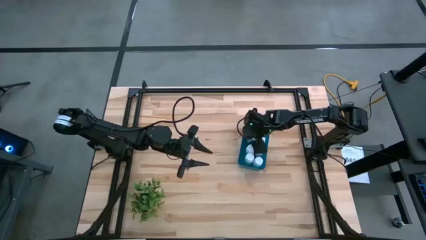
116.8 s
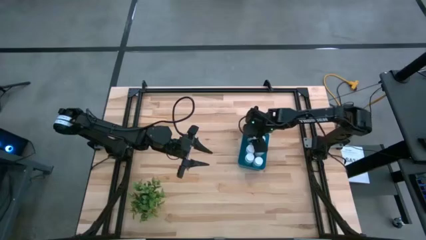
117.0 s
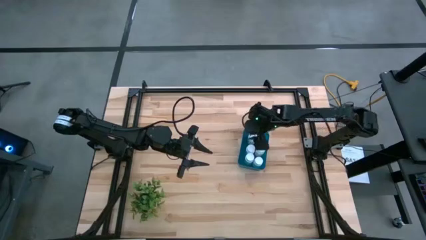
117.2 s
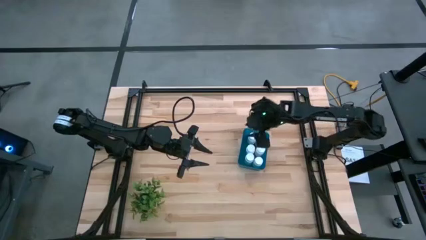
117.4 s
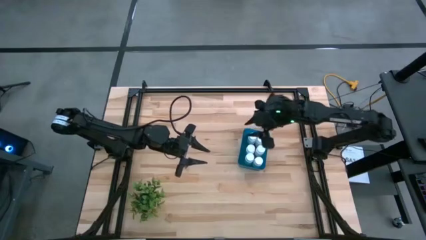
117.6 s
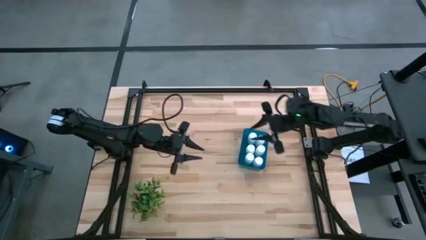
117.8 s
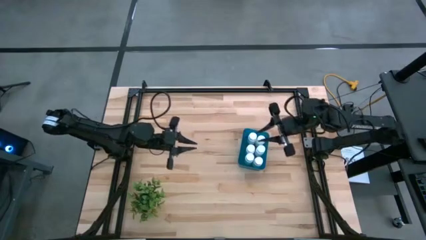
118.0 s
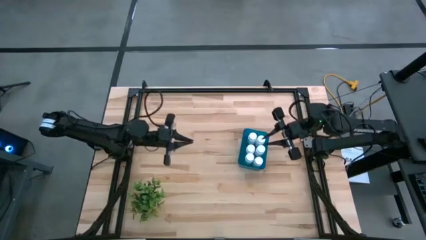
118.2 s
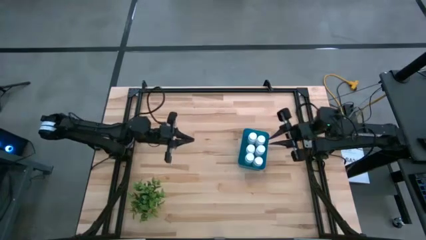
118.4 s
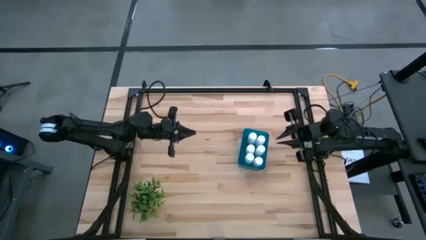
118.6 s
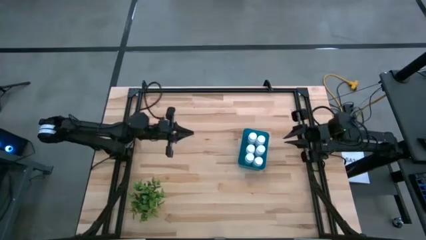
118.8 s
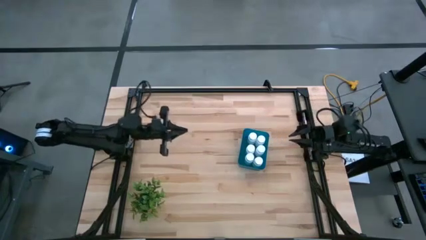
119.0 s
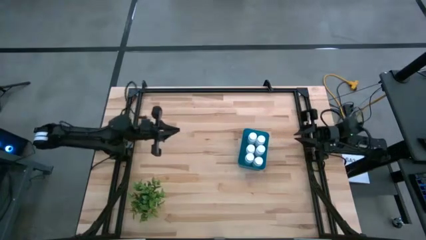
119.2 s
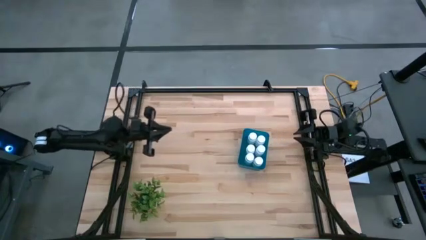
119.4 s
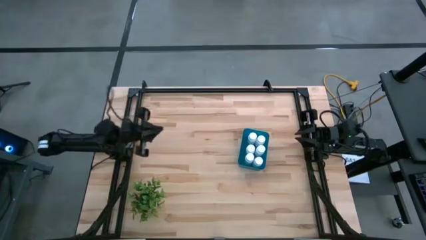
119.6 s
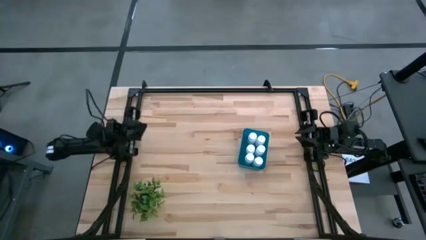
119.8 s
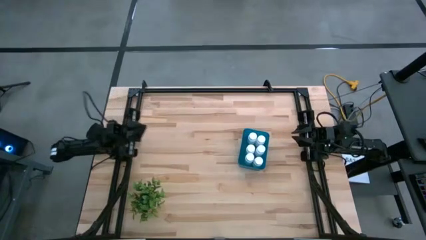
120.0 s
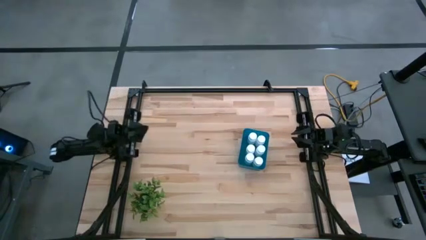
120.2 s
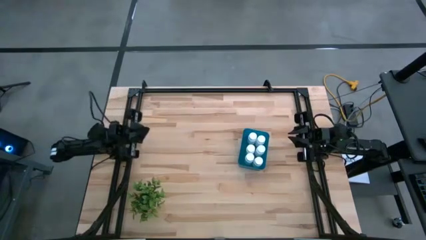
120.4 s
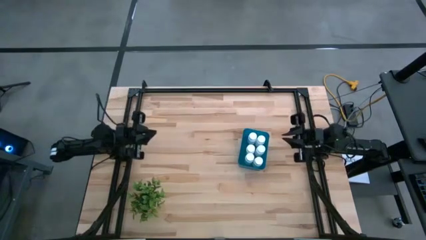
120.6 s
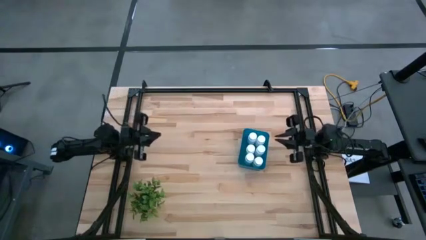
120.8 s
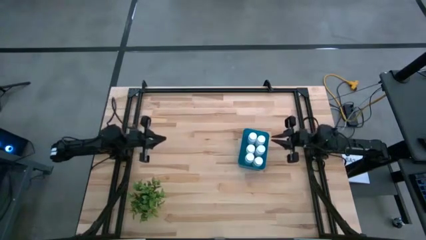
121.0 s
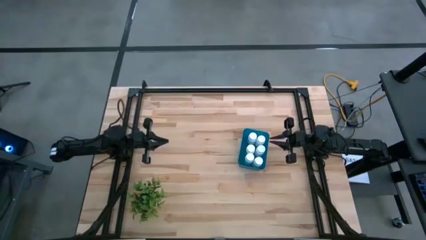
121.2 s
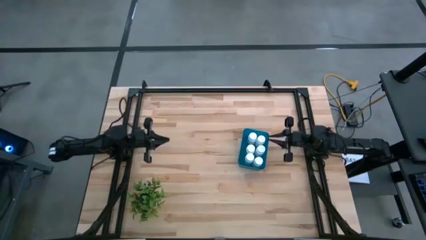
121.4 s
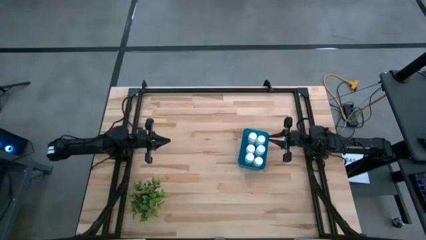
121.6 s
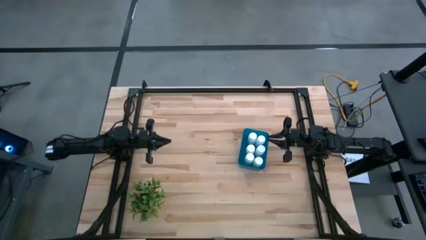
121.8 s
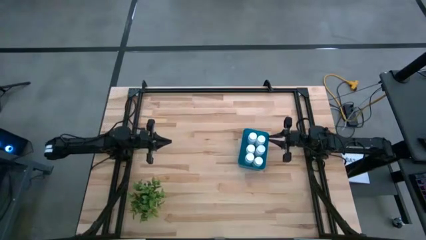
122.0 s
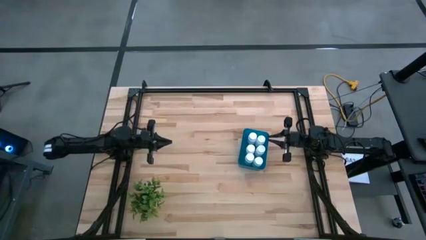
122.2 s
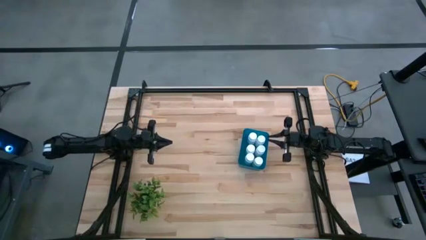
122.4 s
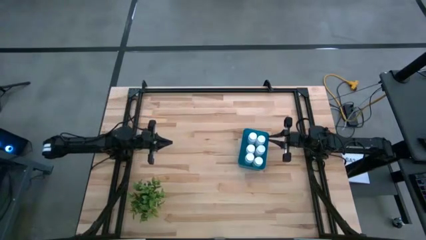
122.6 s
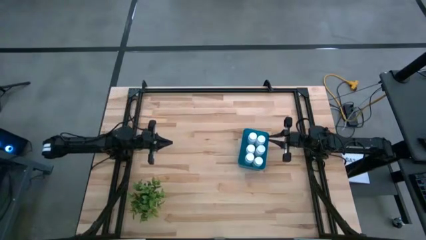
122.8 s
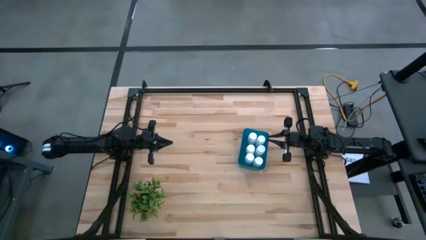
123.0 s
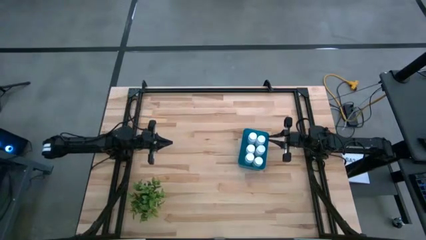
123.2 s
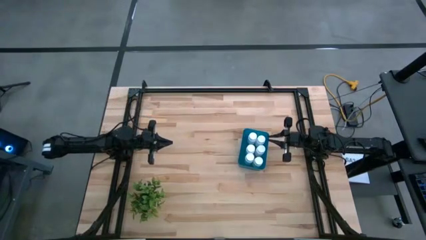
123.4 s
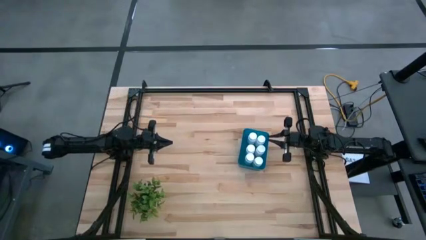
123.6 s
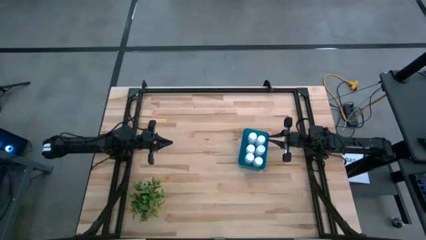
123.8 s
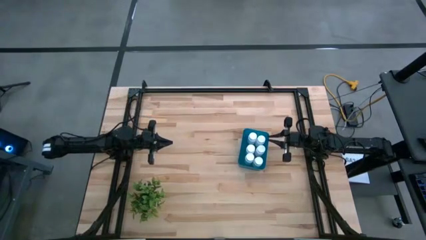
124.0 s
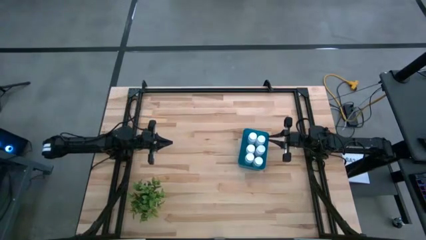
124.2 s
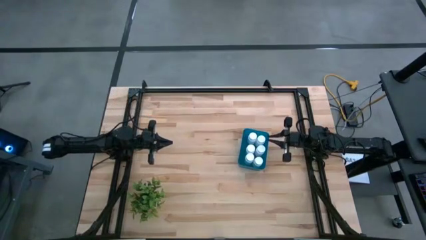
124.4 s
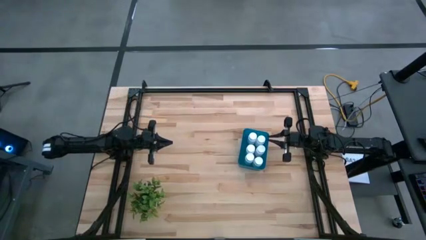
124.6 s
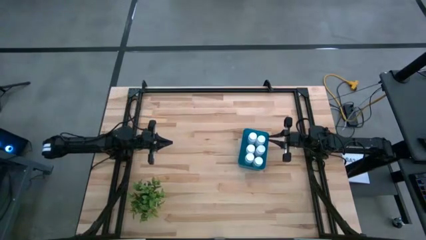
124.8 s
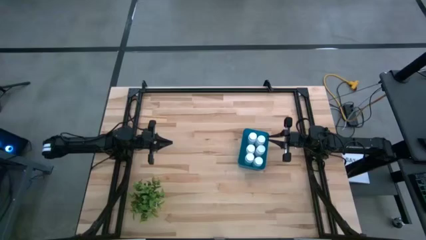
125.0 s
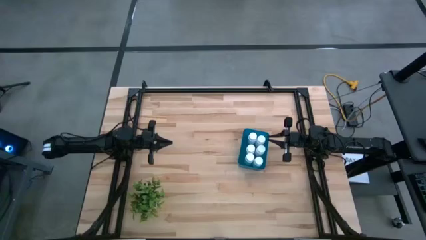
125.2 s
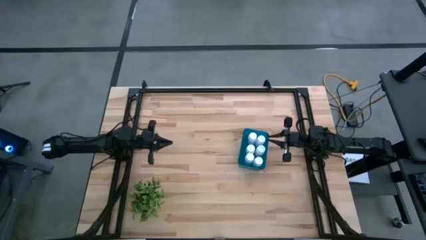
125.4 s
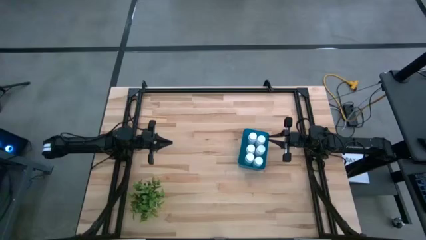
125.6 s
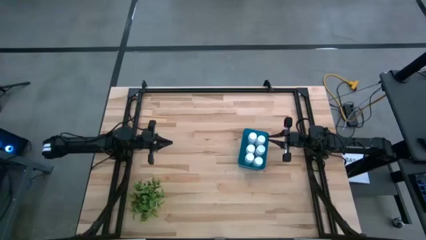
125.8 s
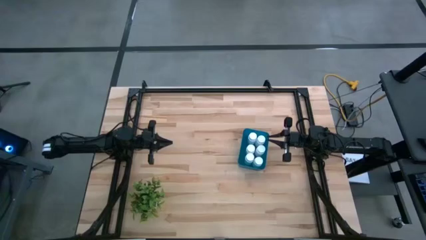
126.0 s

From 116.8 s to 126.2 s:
Task: Pick and place pill bottles into a basket
Return to Home Position

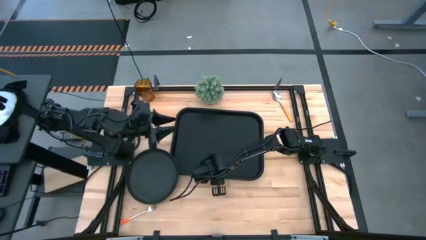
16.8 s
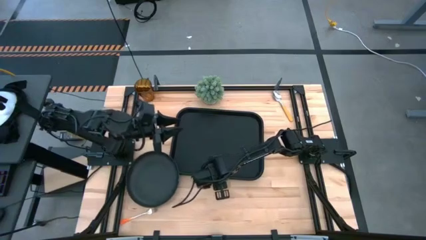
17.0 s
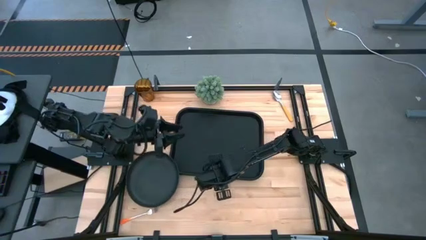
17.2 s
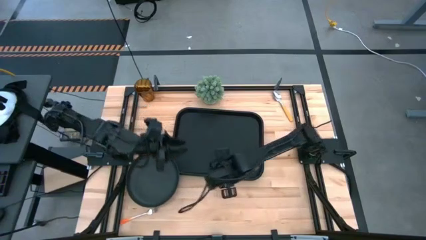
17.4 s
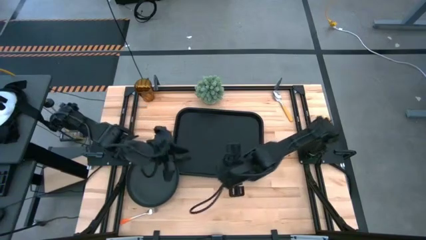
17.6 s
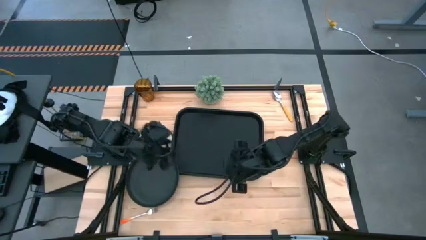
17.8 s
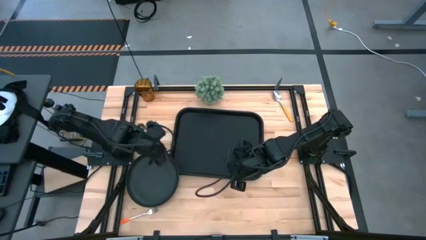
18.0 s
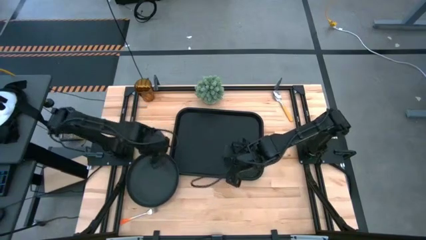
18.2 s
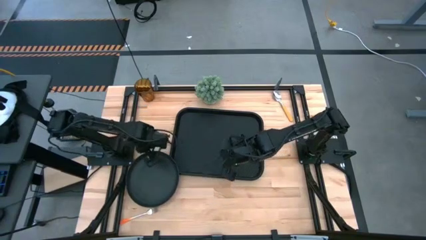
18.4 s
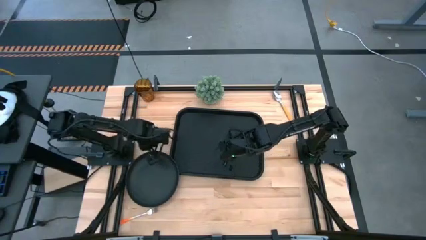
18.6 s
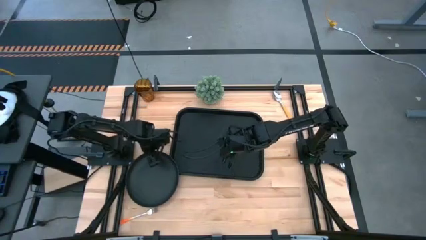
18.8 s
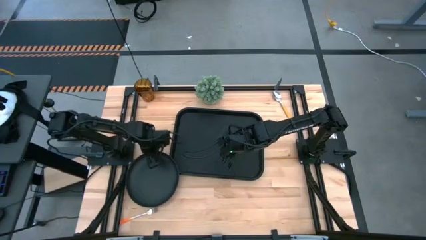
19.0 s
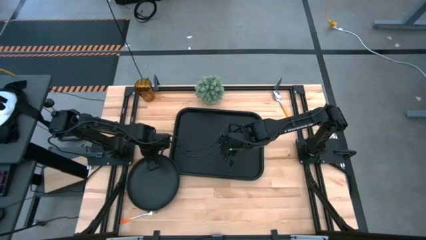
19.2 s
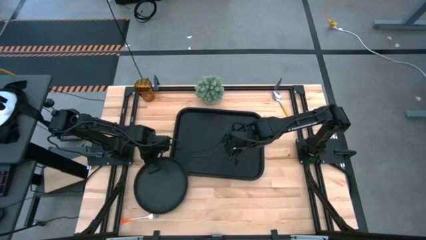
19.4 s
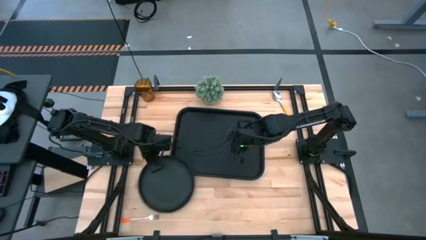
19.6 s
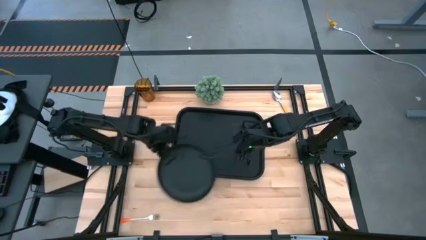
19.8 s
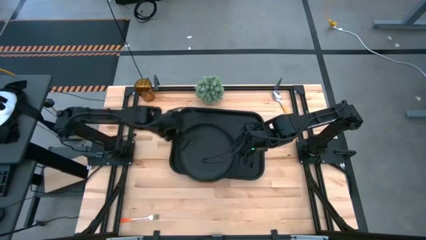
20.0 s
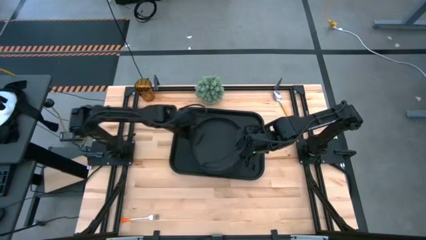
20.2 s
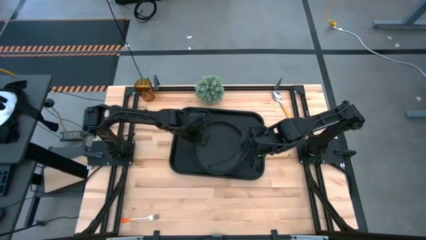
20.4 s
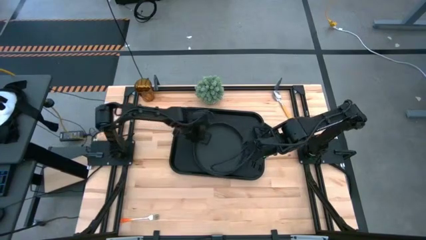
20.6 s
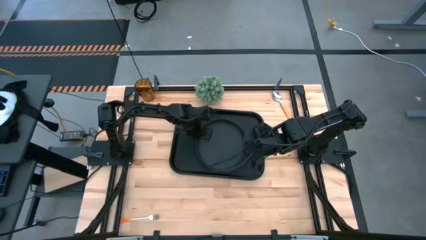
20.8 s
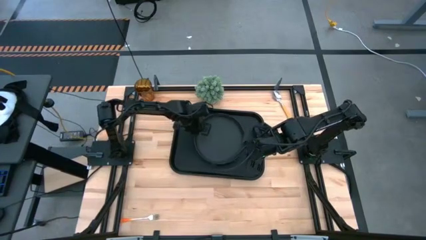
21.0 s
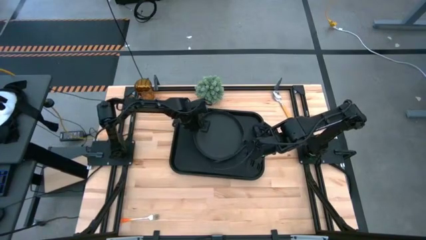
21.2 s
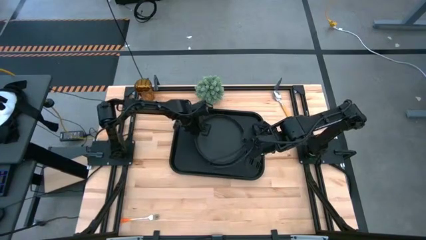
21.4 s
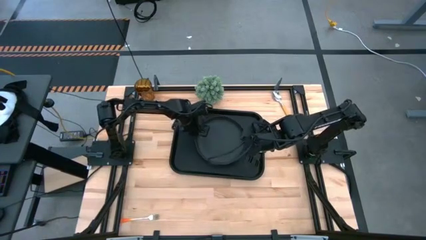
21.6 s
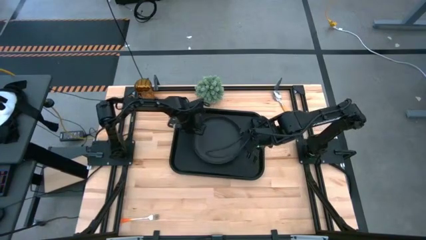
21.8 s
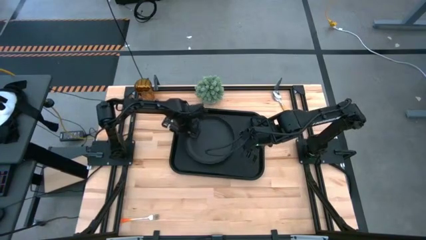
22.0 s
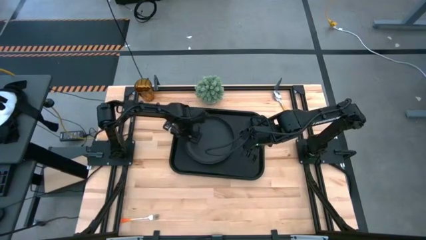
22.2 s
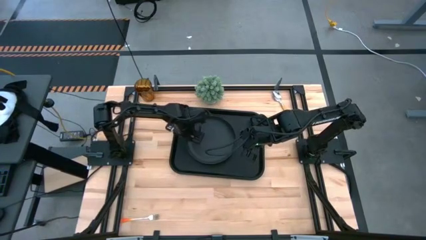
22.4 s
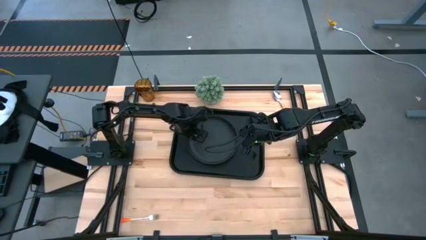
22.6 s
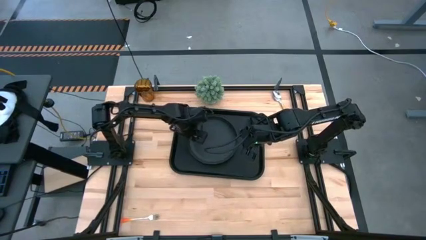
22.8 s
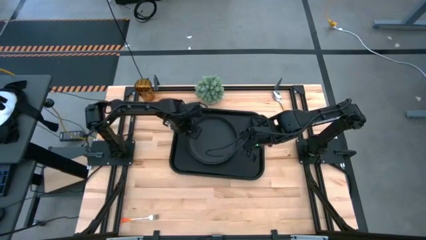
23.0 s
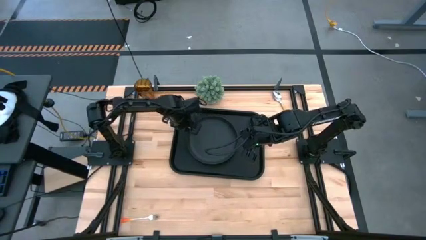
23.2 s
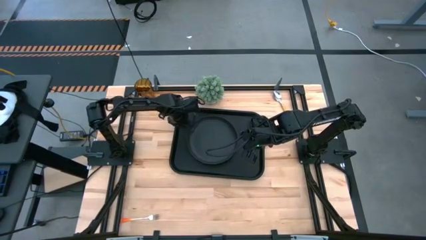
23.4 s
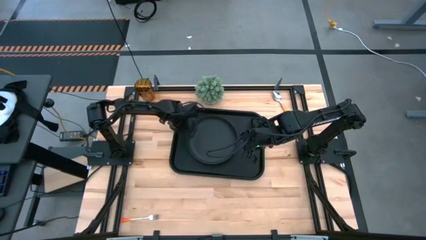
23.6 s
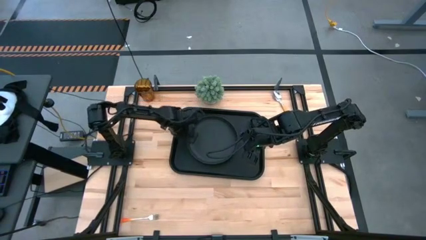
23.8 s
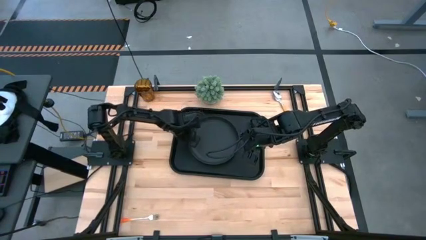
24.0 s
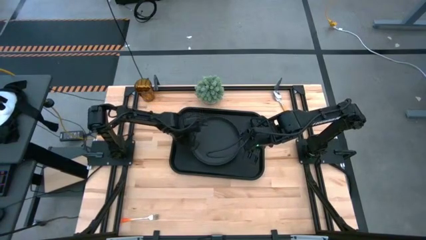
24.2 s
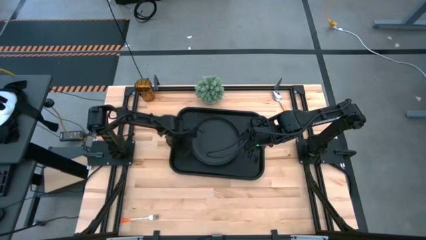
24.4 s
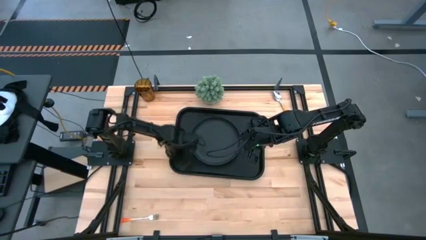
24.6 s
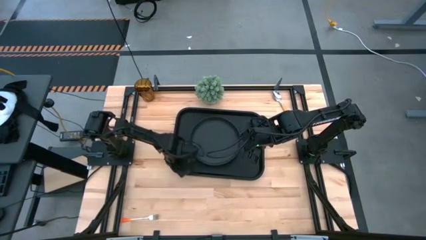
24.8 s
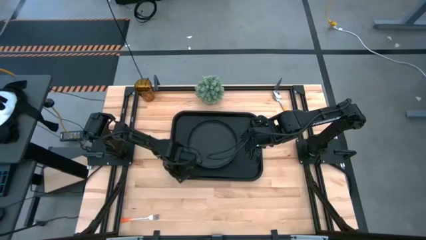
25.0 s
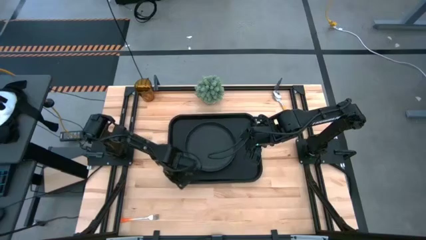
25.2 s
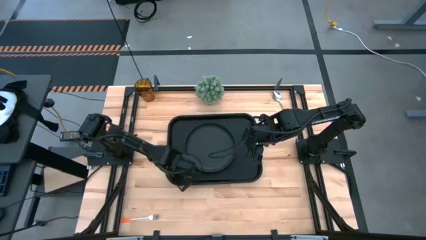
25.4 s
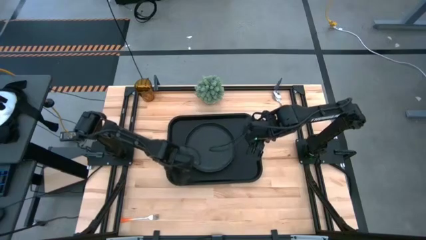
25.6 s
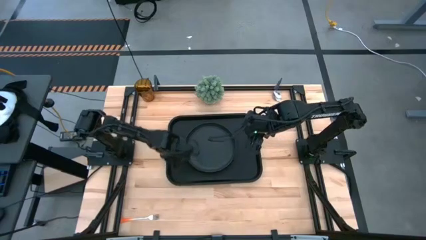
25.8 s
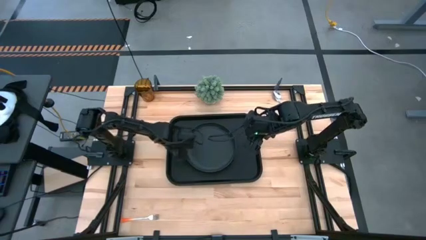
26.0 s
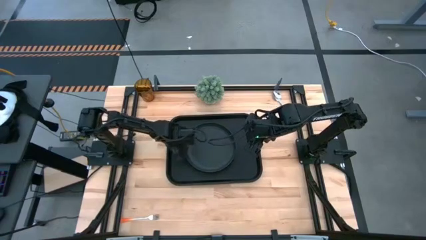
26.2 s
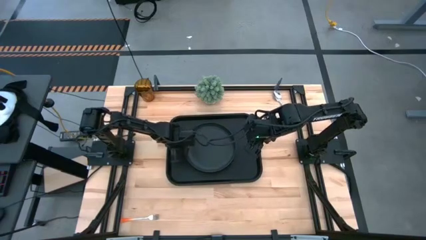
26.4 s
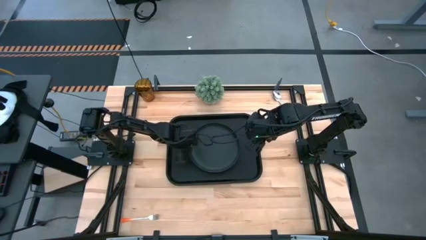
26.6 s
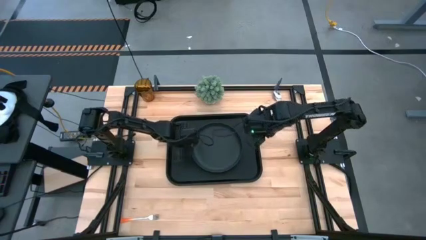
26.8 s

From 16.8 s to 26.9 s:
Task: Pick and place plate/cup/fork/spoon on tray
Put the black plate on the middle of the black serving tray
